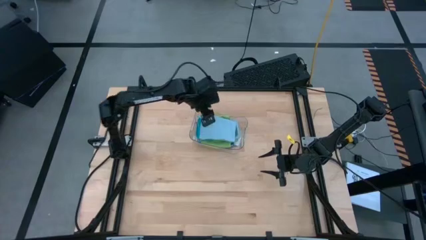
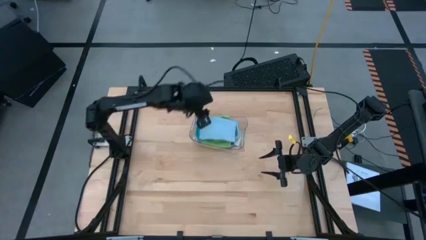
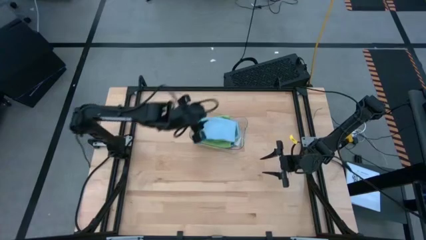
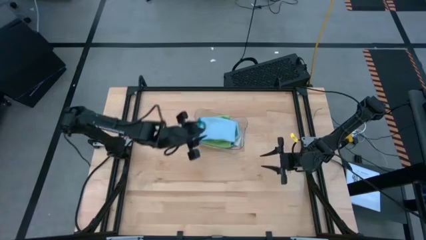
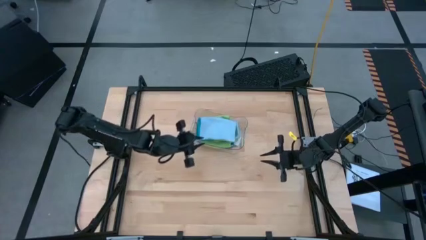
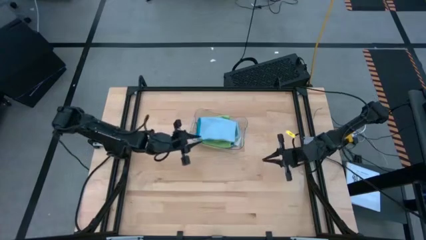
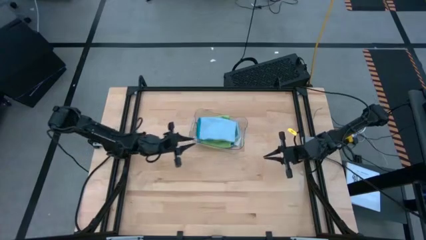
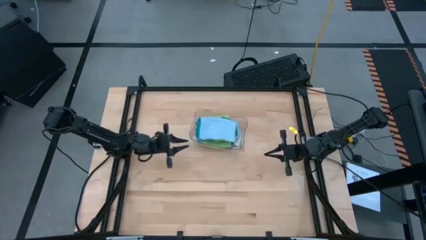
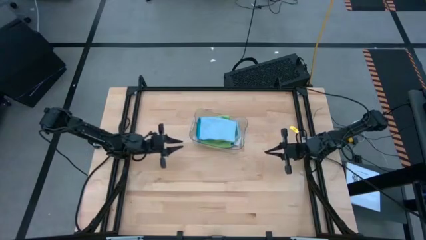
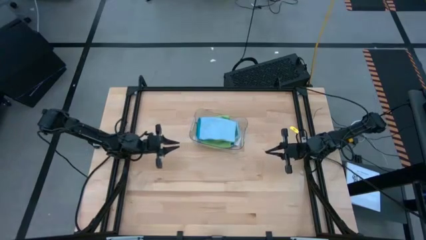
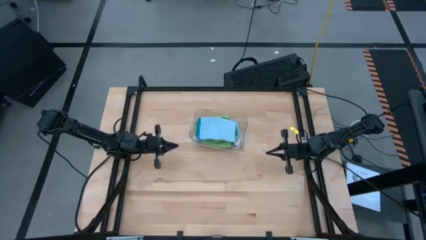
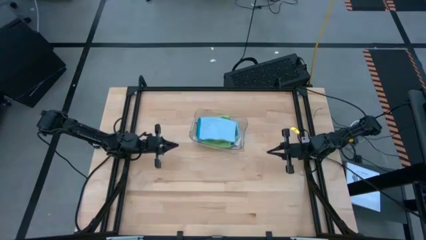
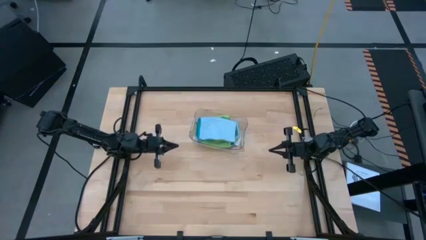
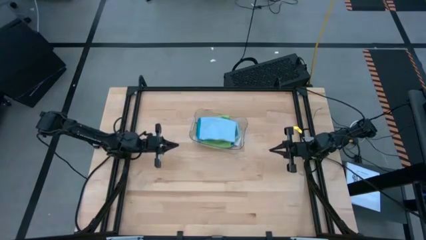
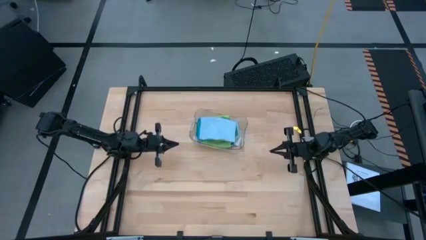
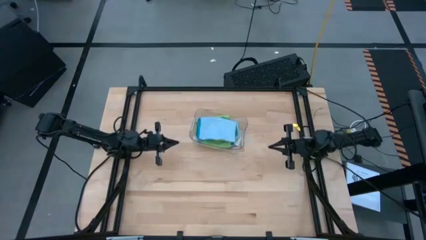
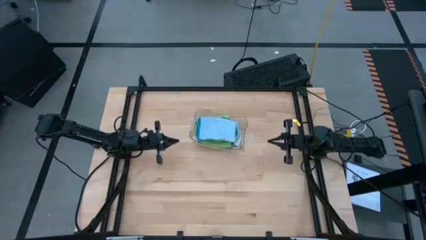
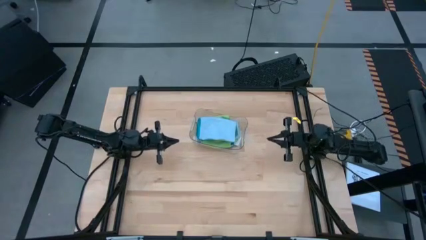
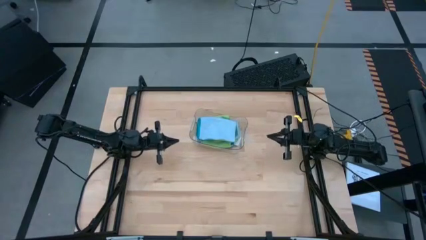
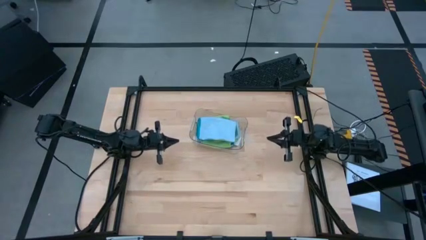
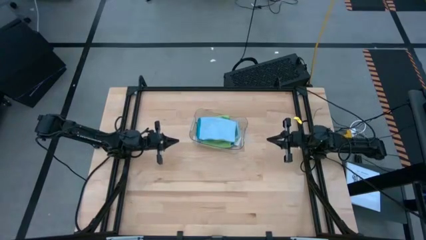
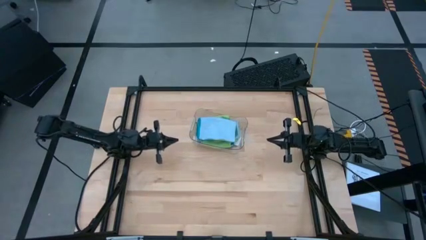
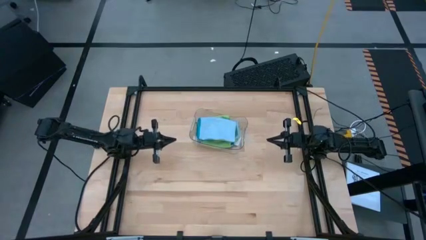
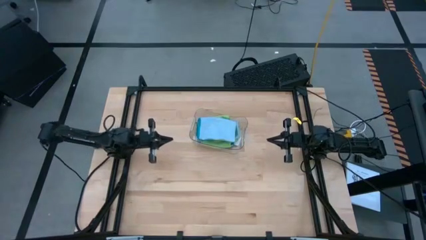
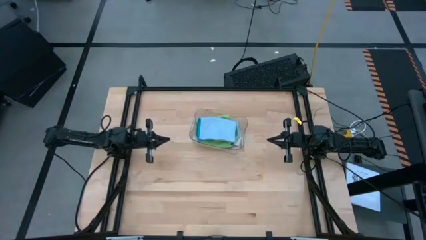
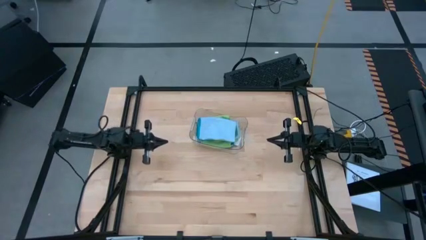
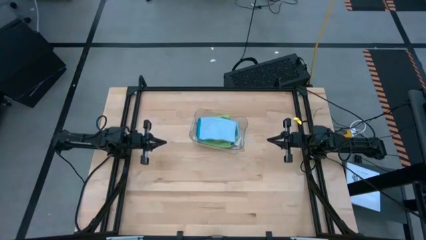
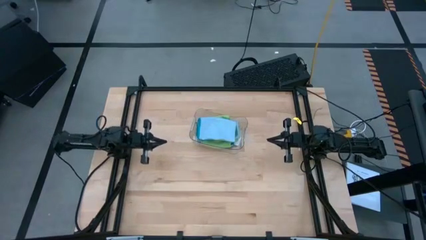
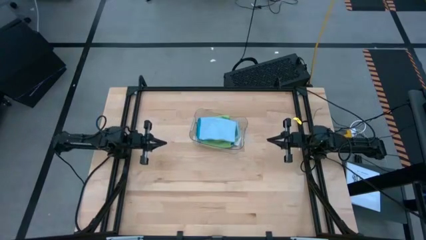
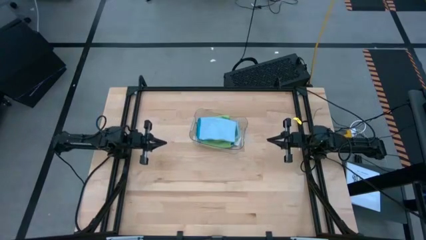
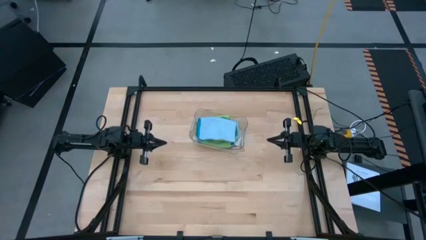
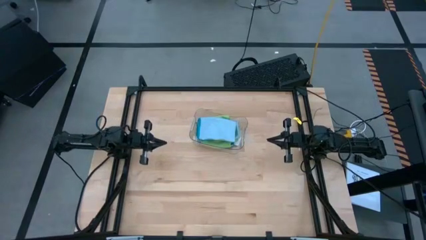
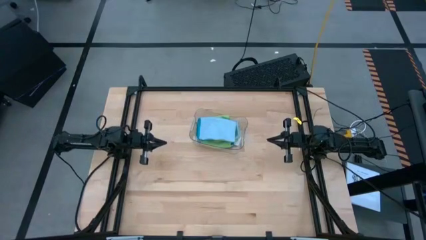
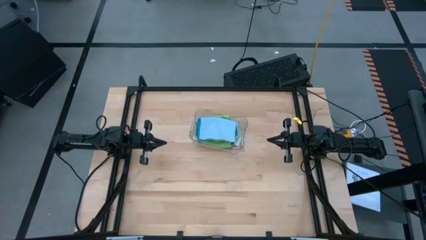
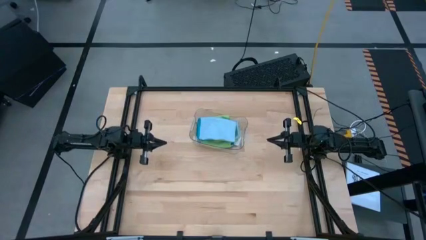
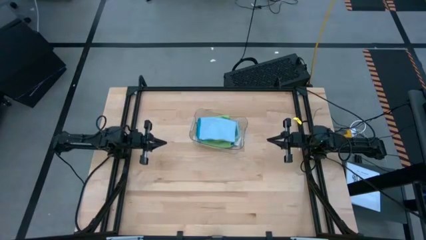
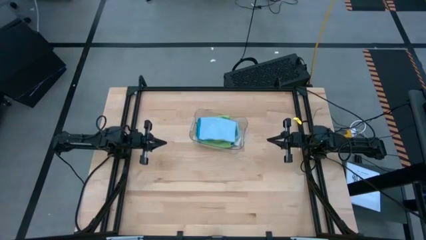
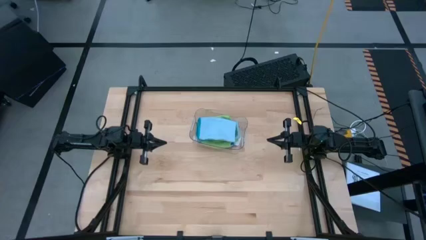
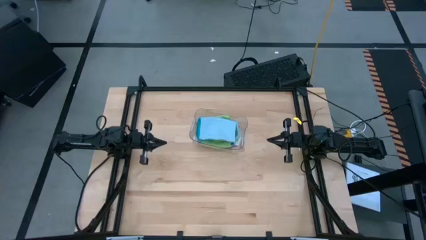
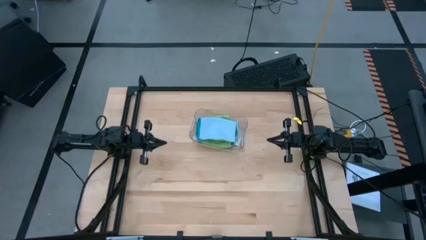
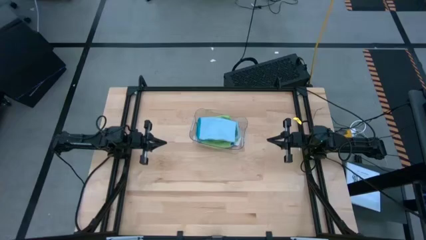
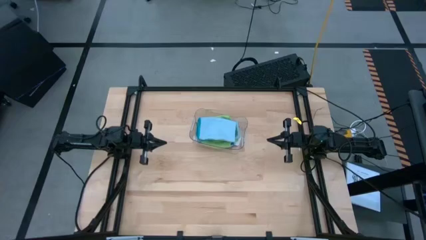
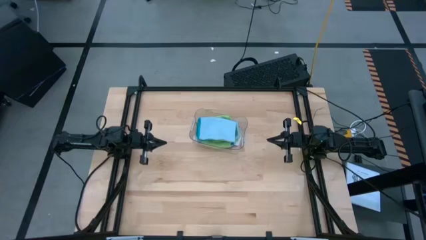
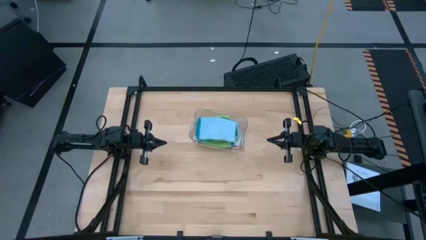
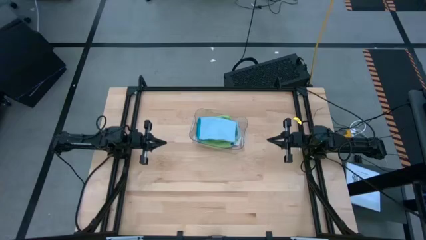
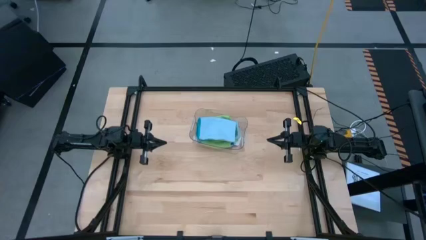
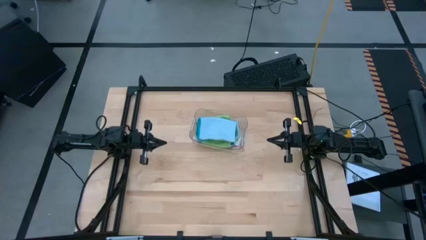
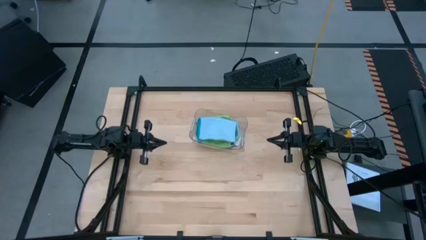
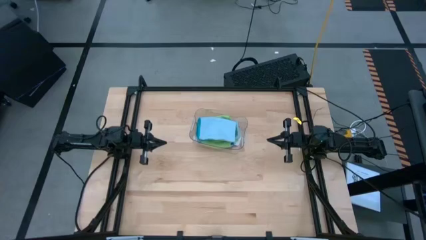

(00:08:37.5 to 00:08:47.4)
Task: Fold microfiber towels
Return to Home Position
